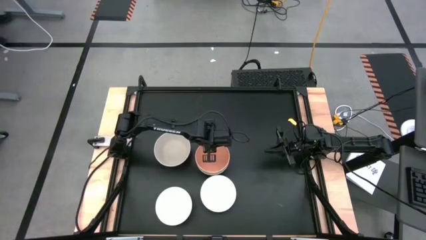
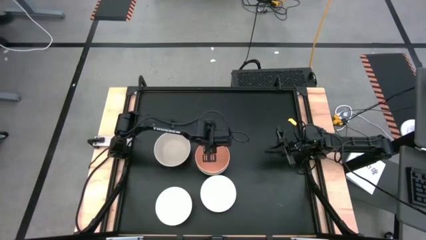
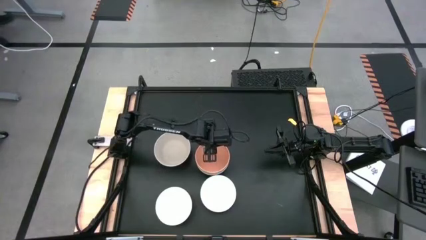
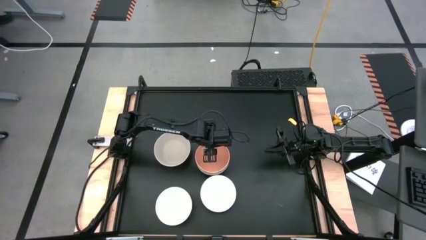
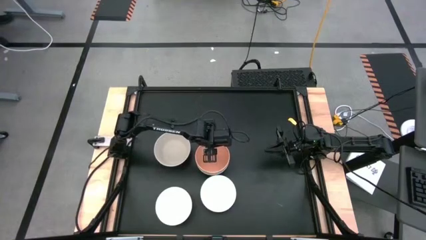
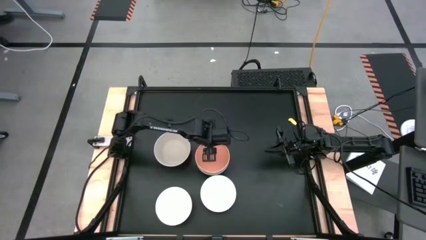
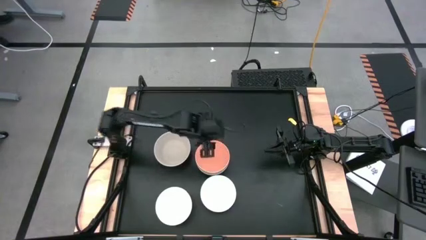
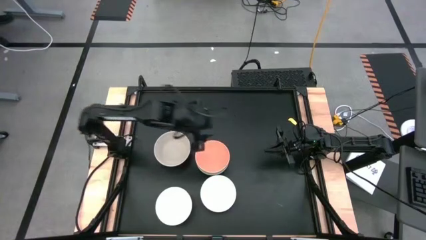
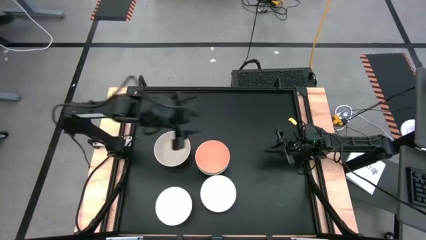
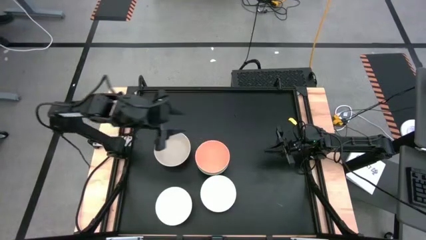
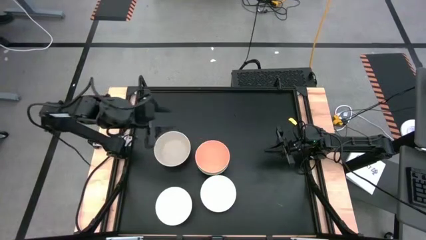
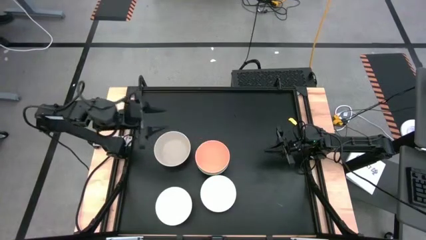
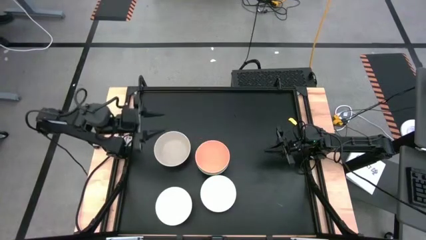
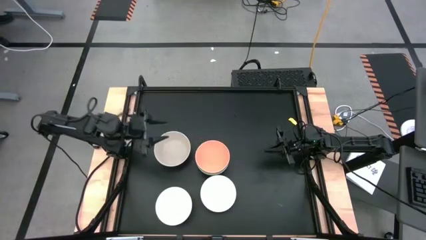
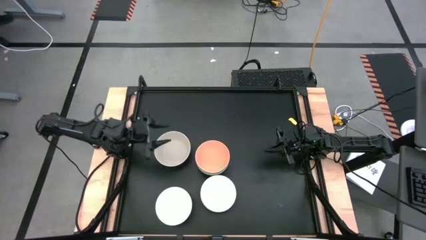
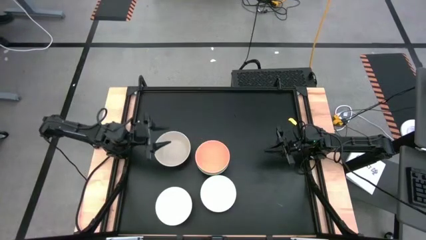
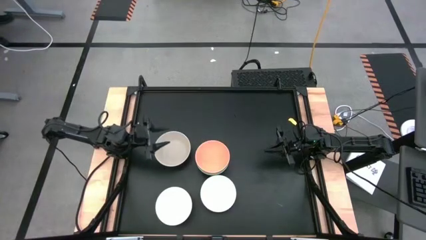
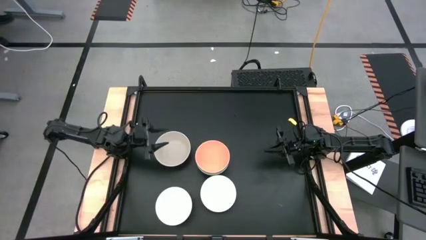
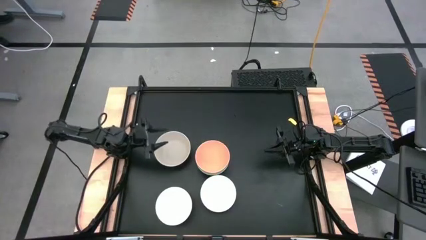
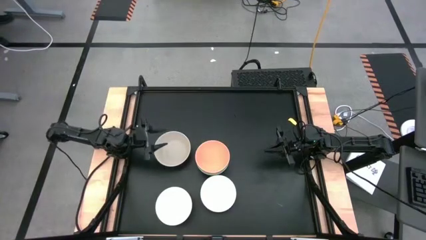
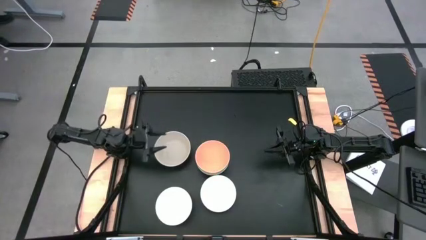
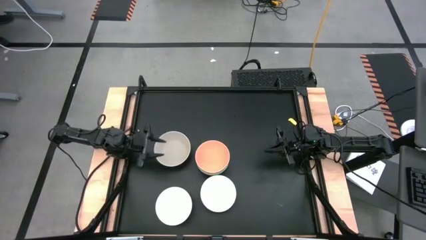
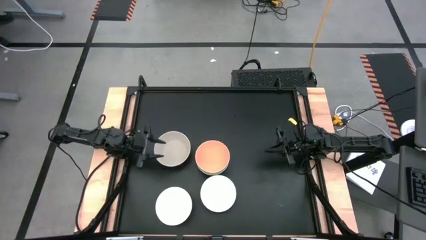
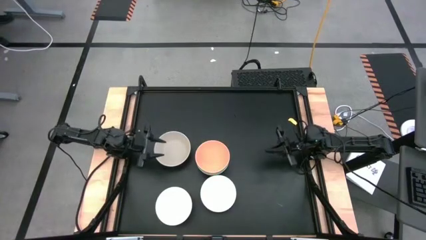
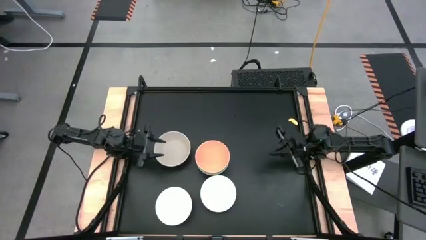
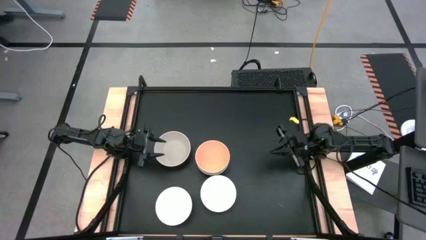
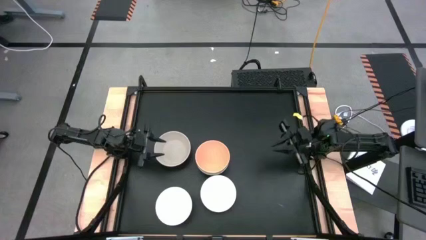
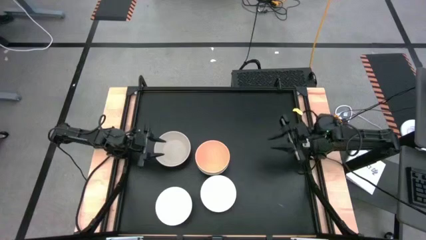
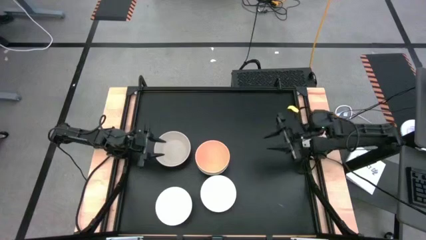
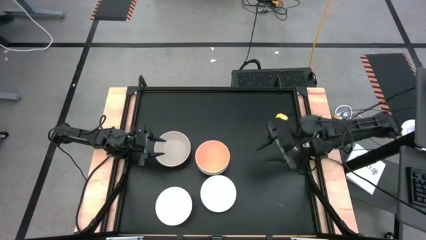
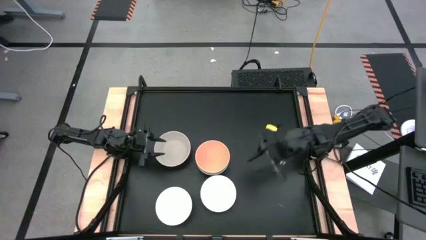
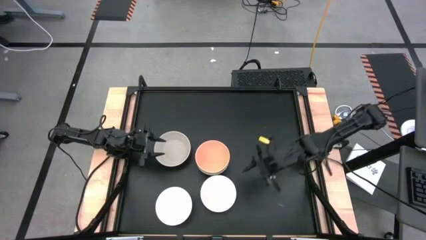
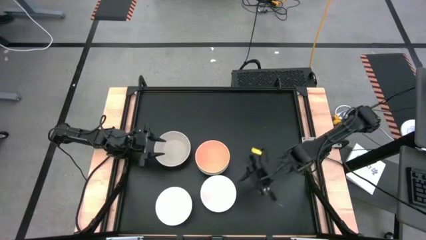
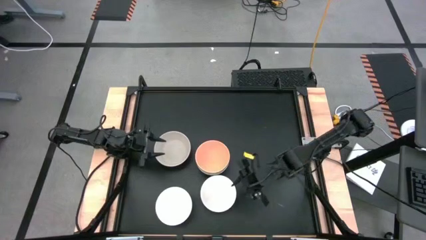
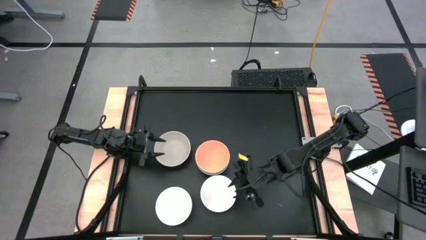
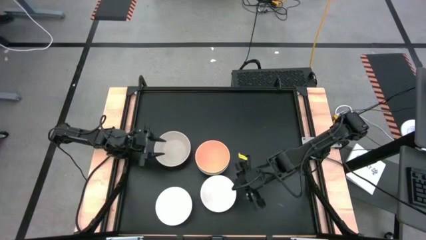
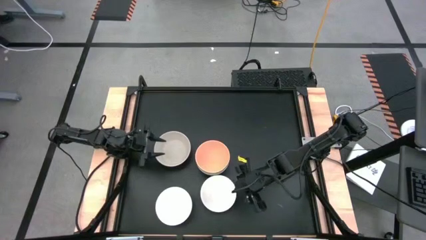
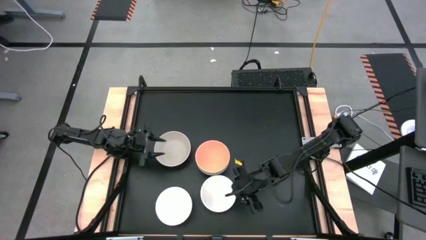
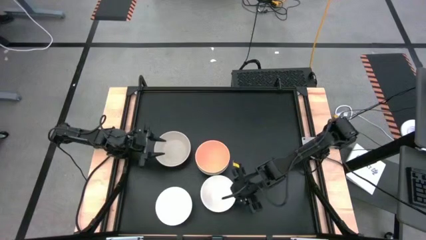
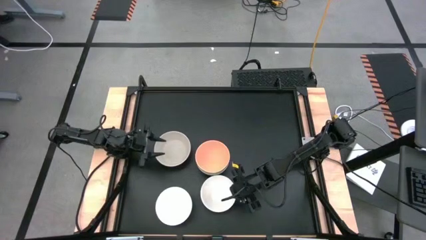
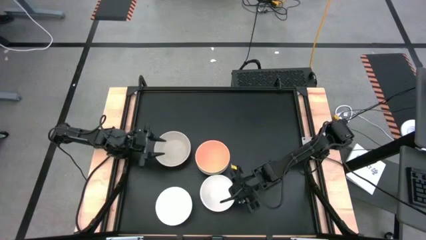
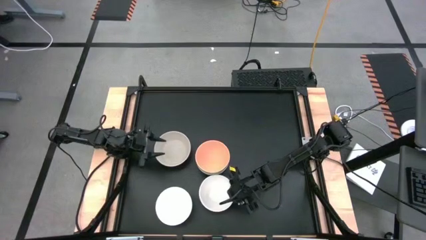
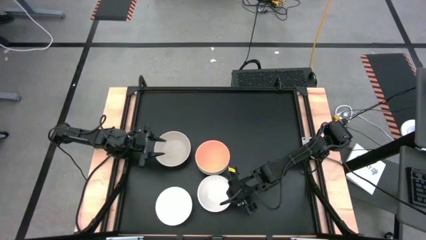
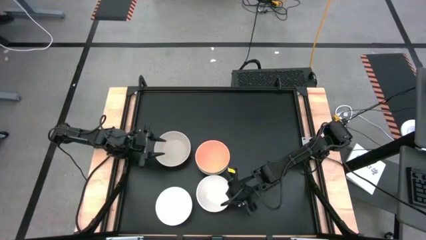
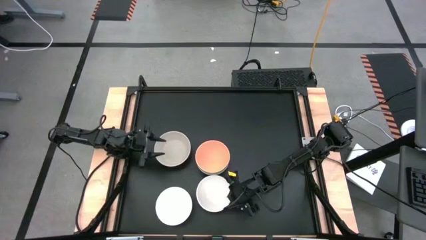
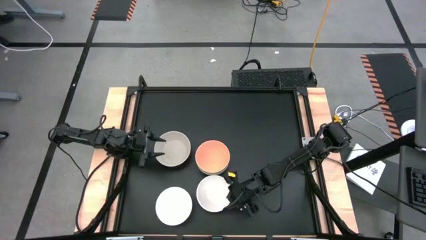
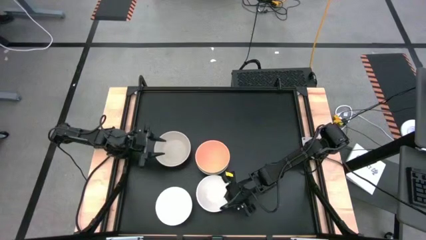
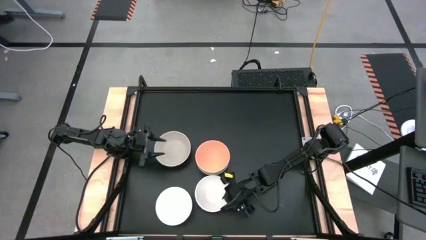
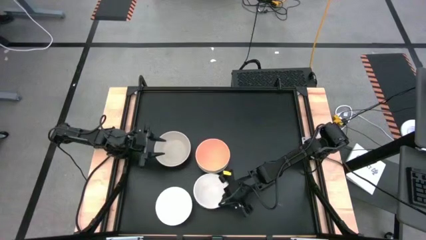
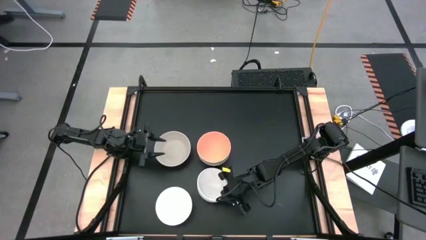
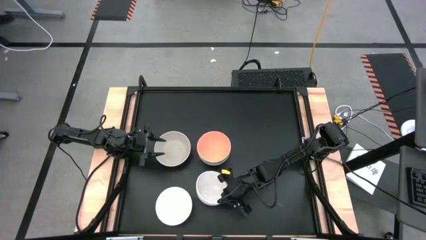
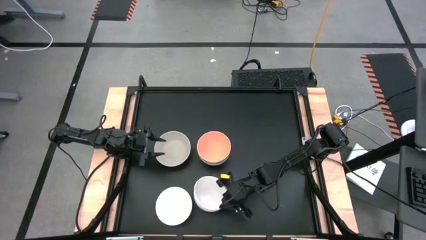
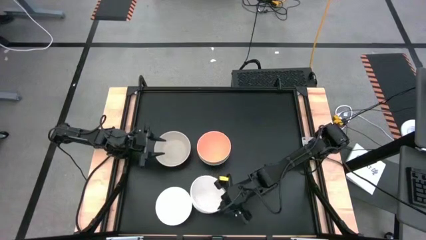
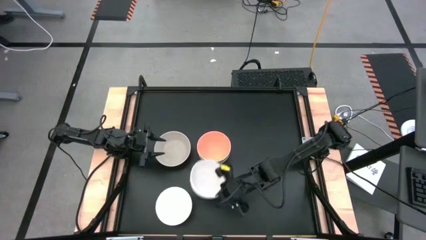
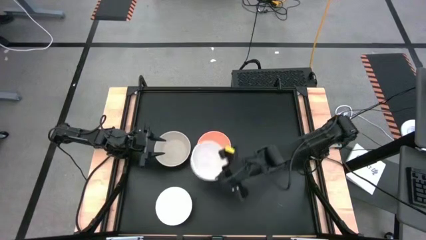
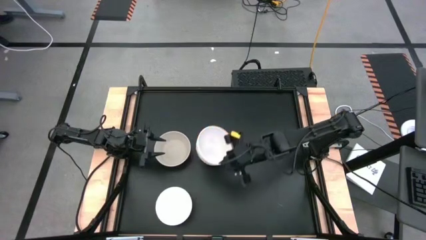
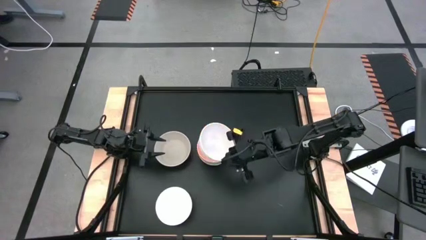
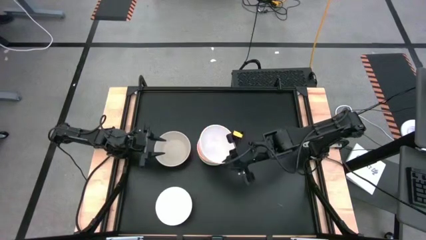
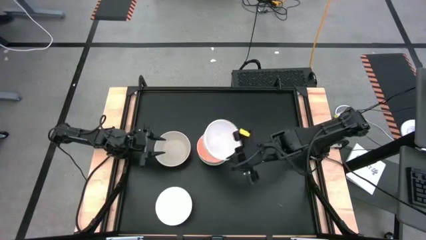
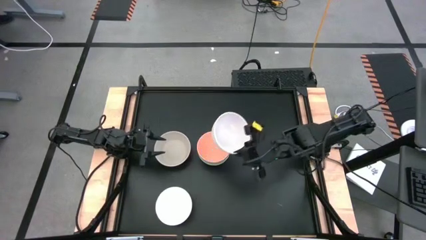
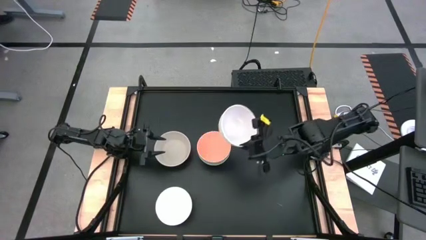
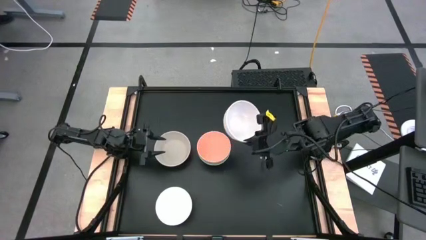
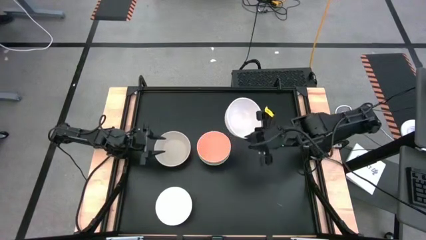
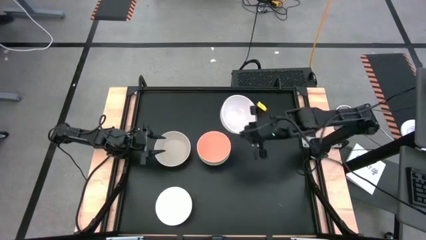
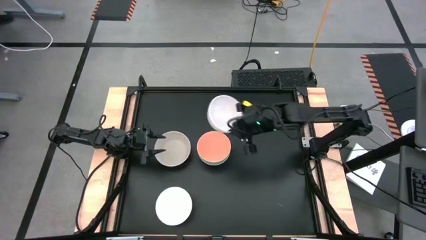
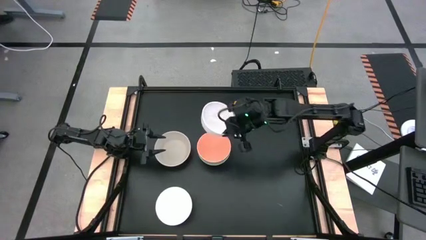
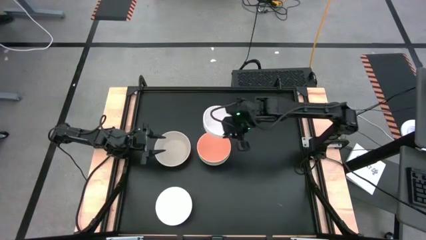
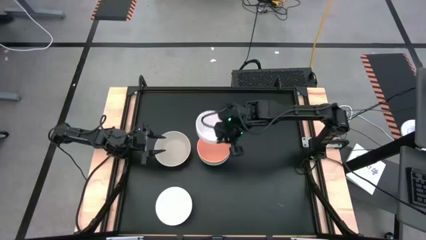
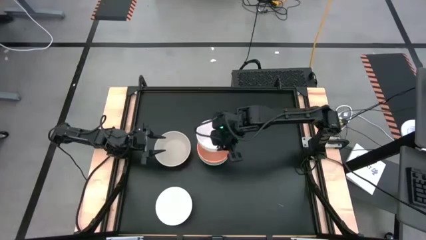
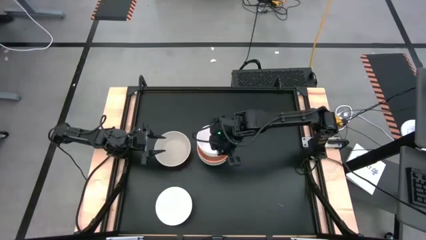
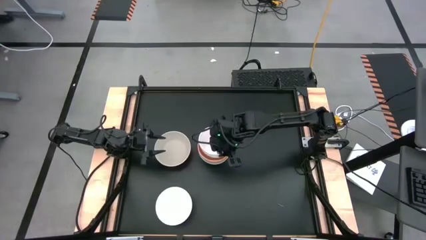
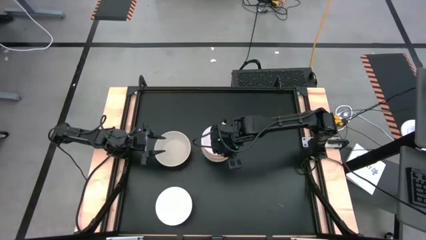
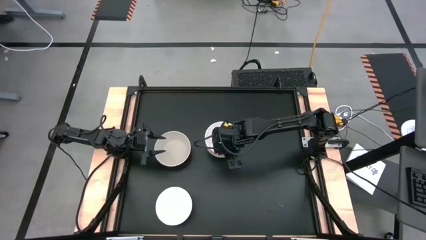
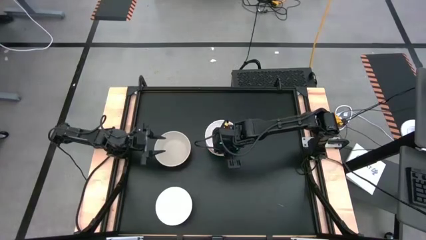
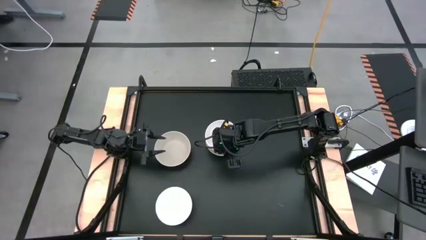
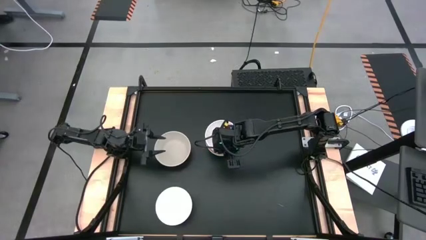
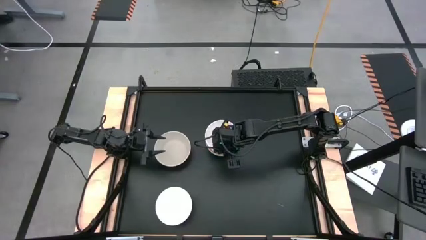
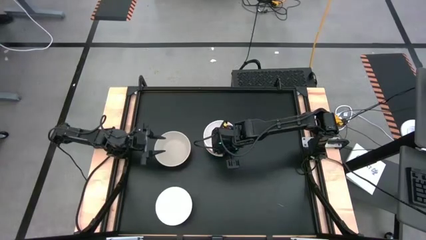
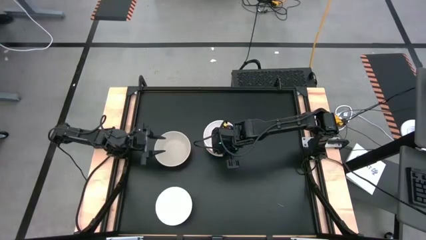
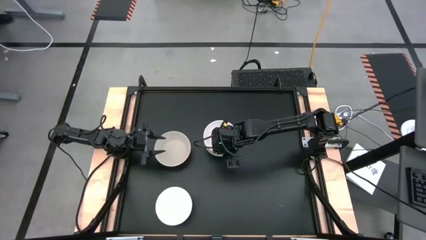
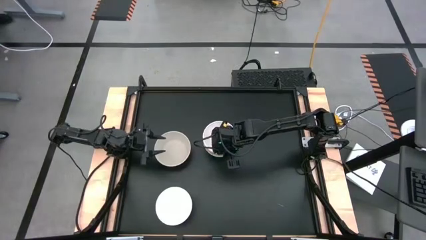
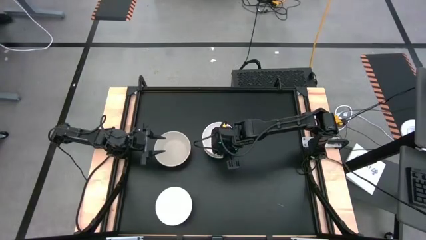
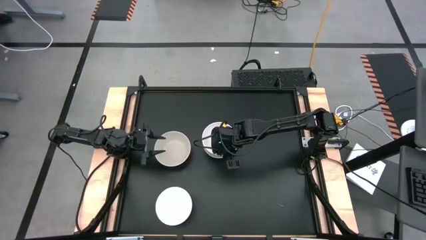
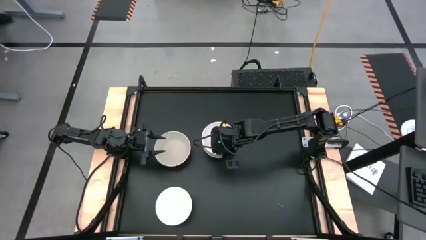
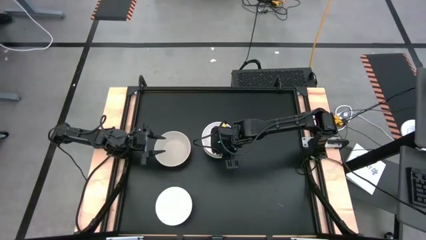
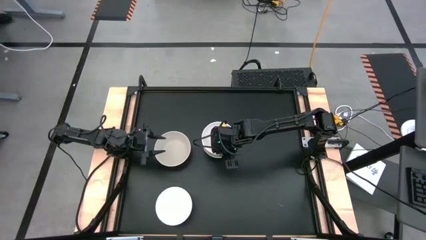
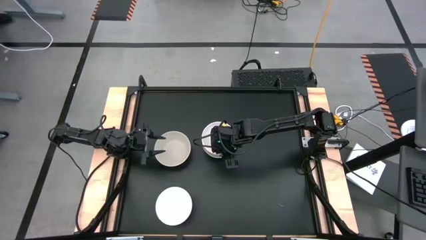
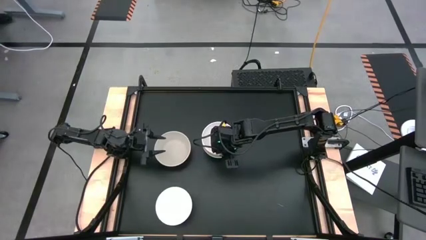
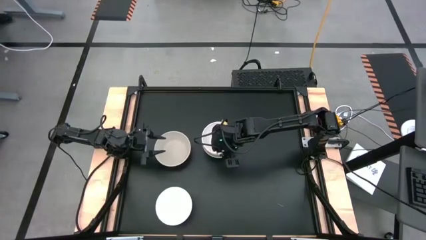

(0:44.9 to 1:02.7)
Task: Nest bowls inside each other
Stack the right white bowl on top of the orange bowl
